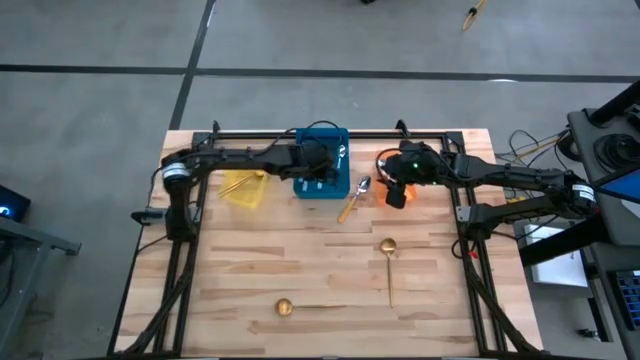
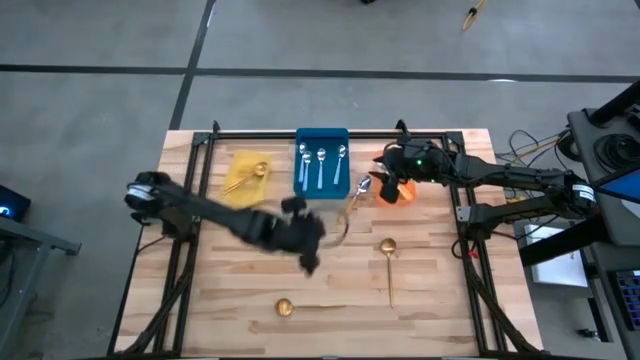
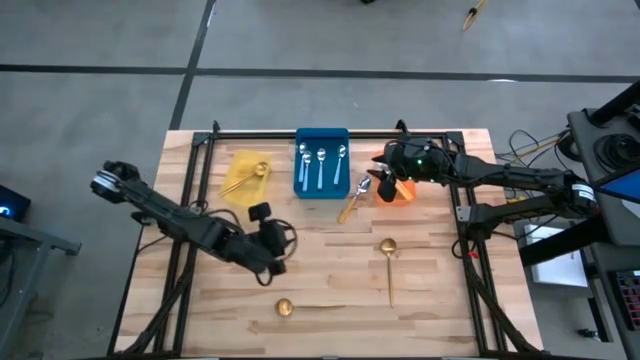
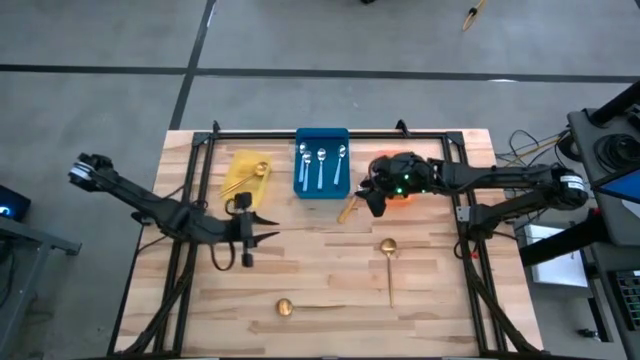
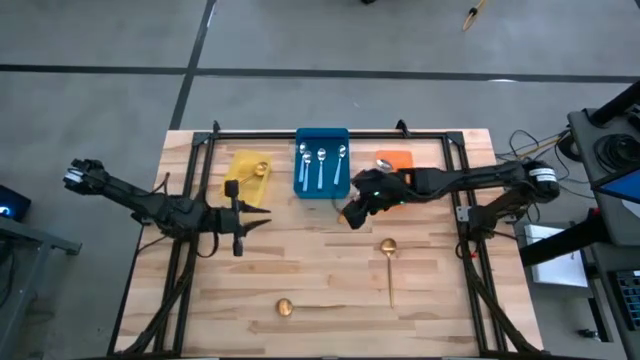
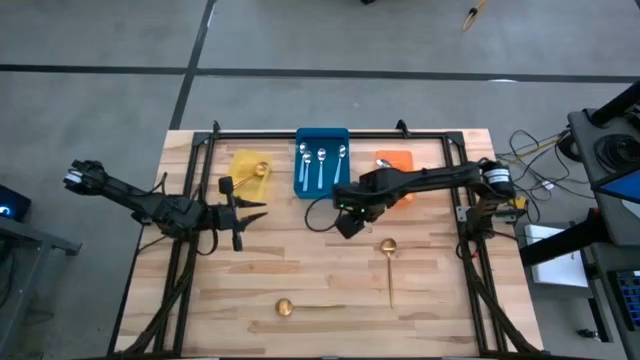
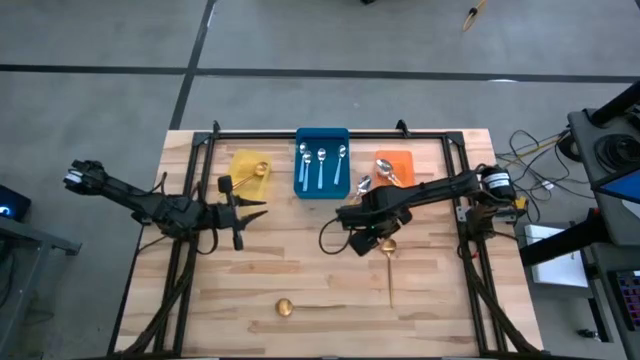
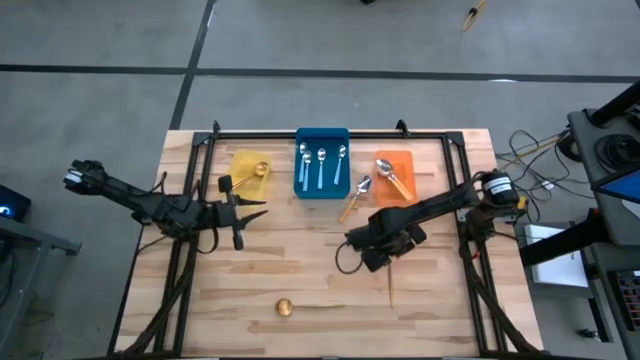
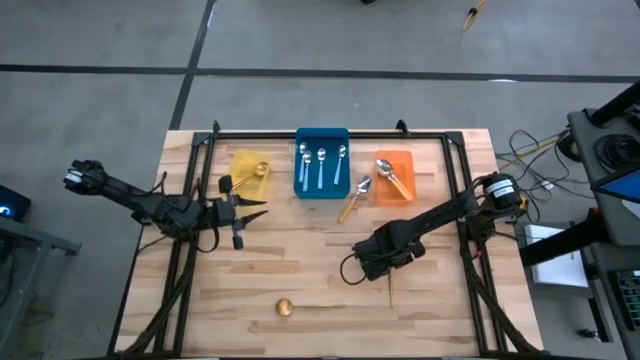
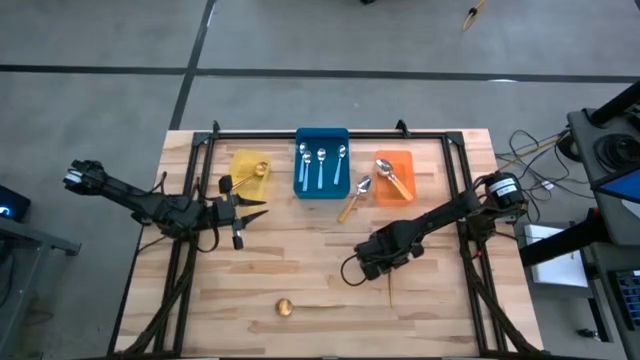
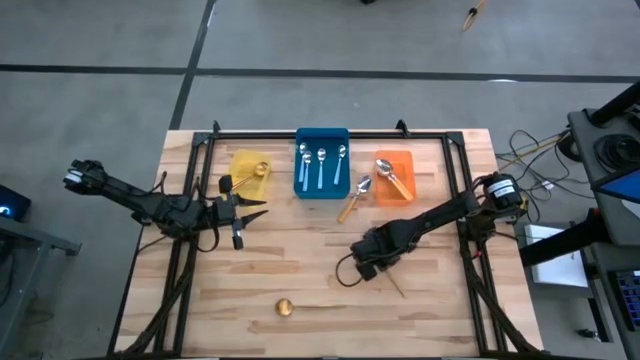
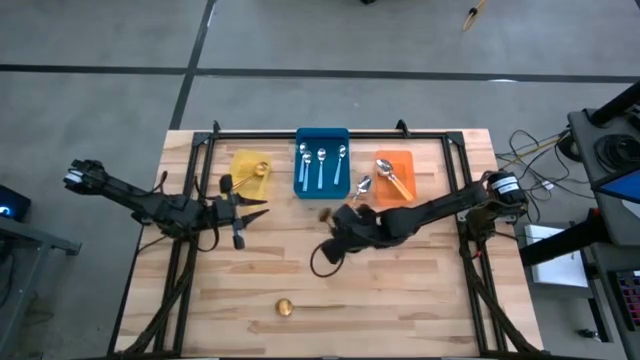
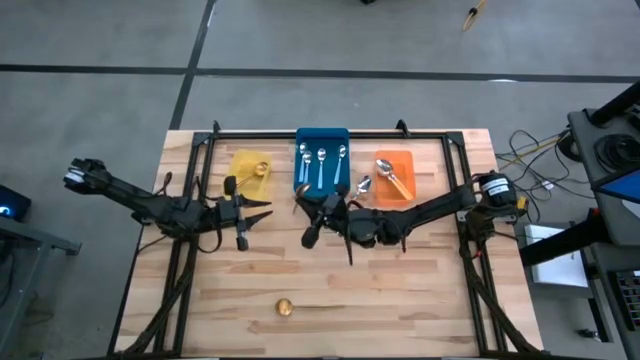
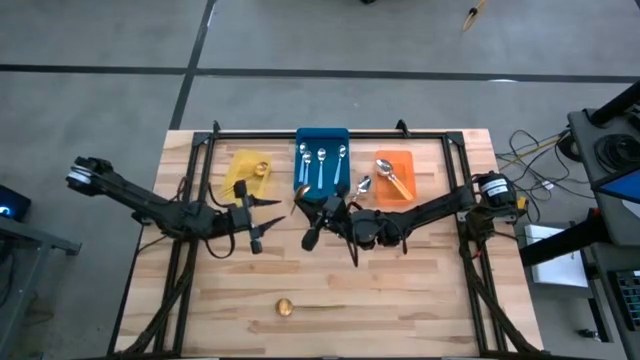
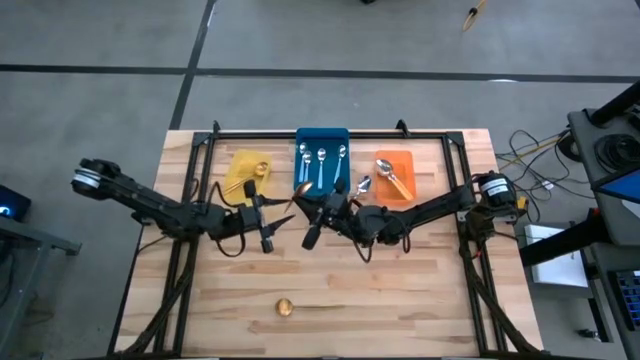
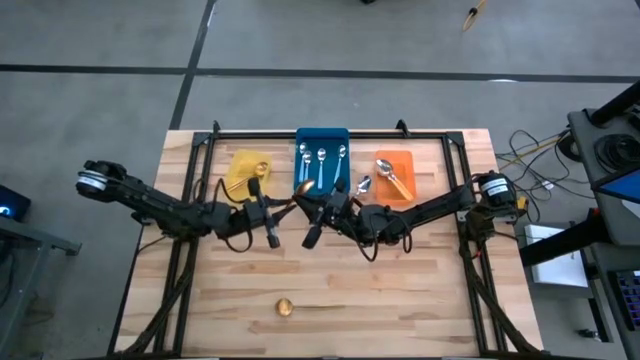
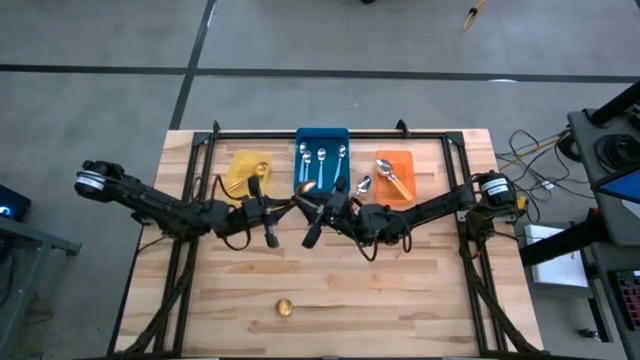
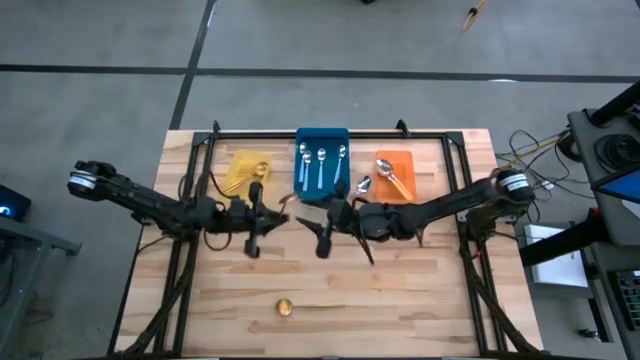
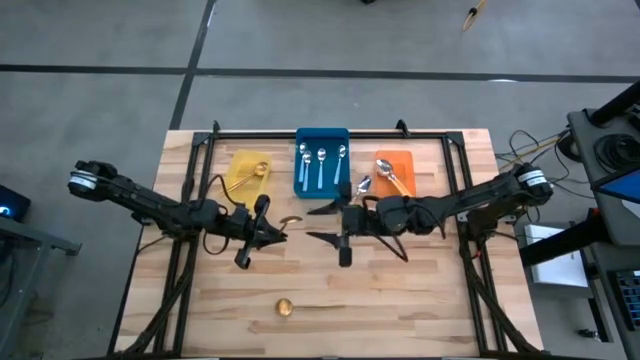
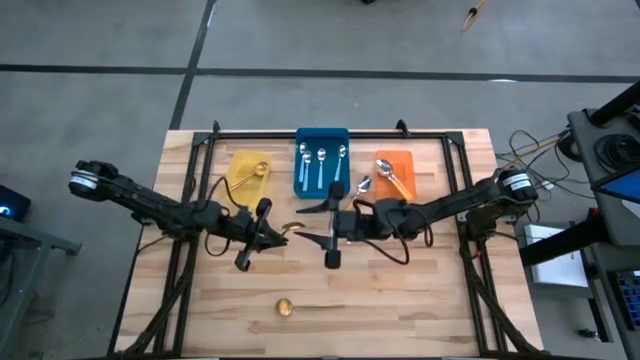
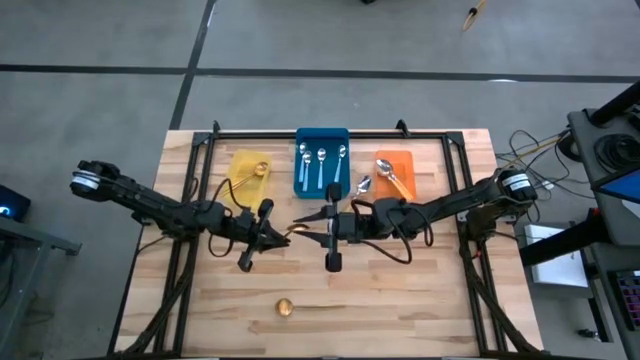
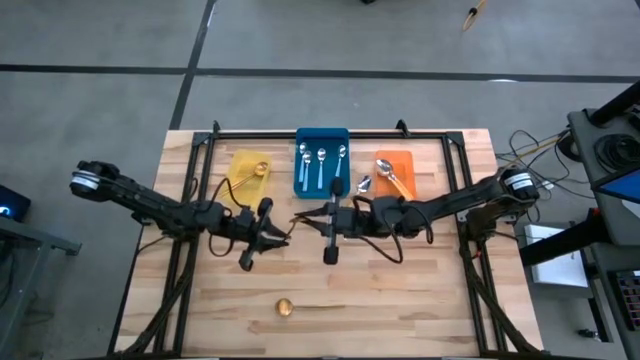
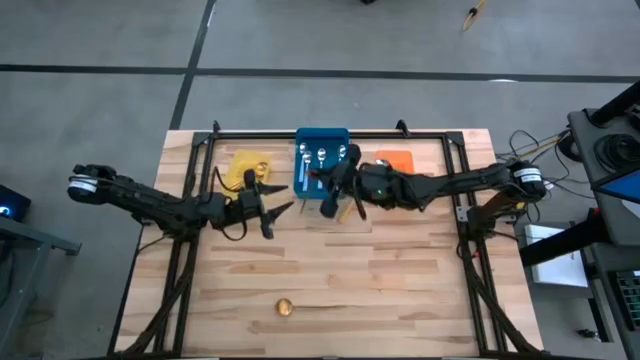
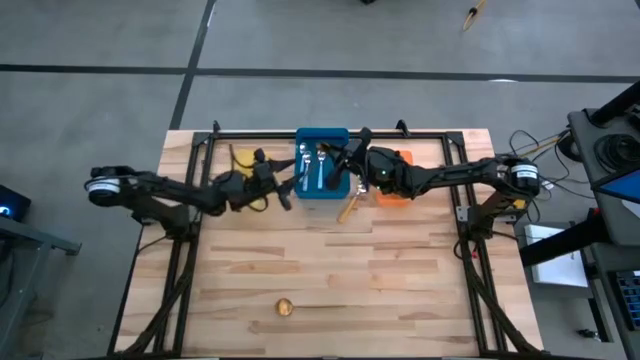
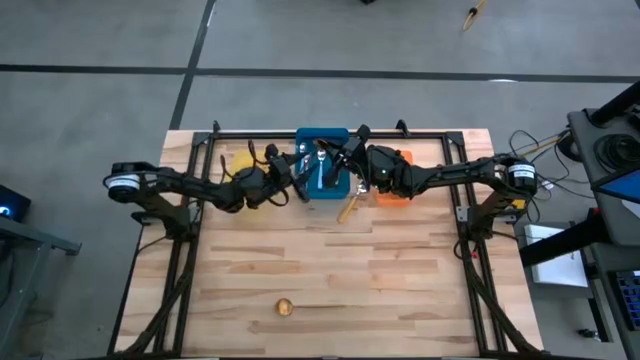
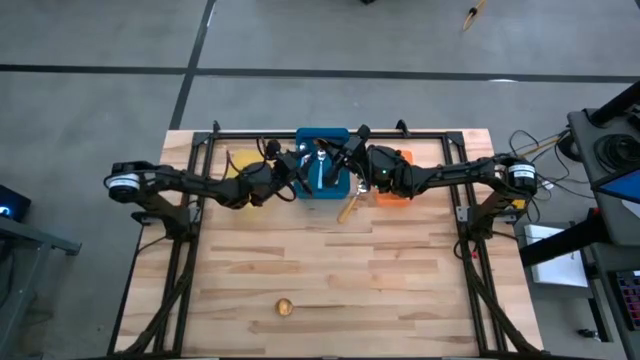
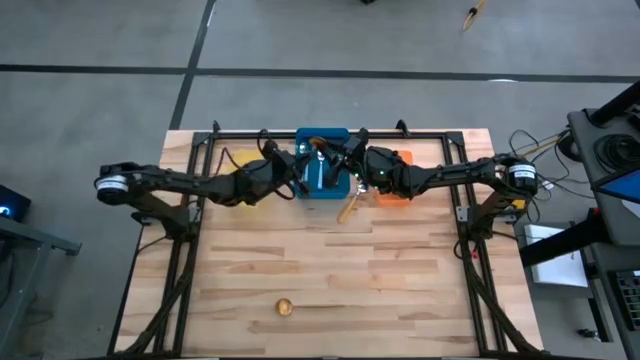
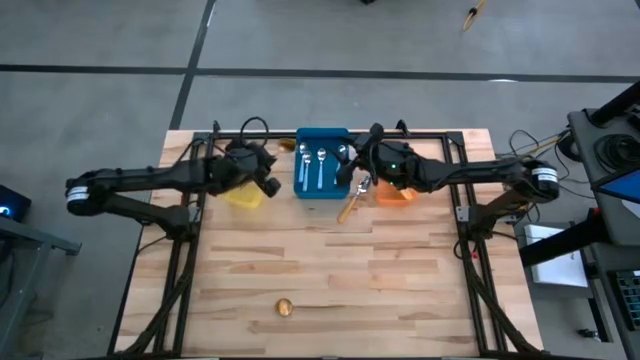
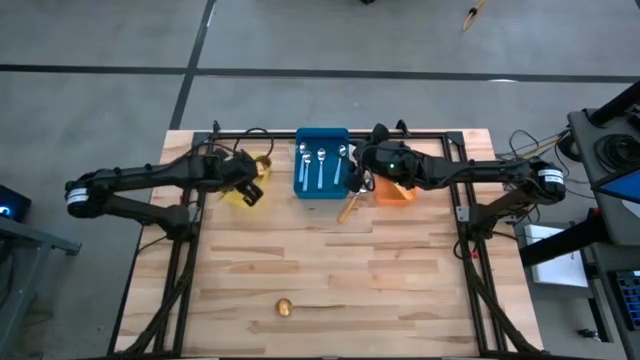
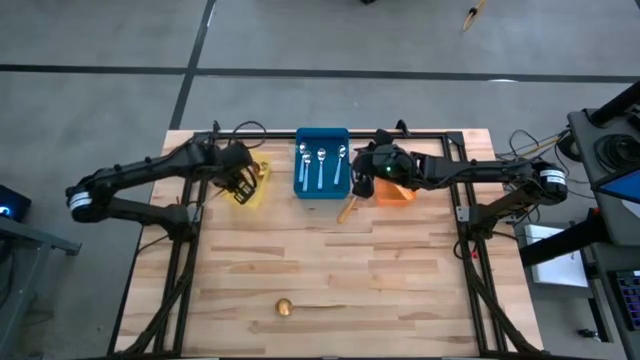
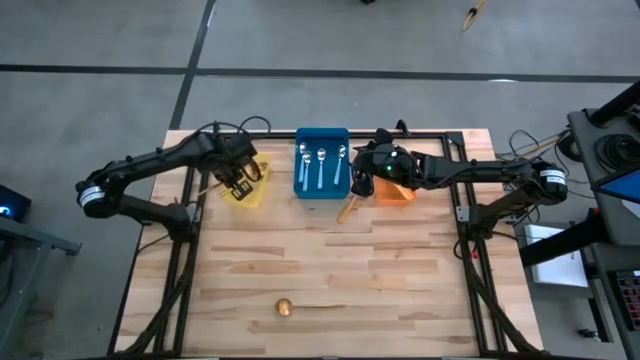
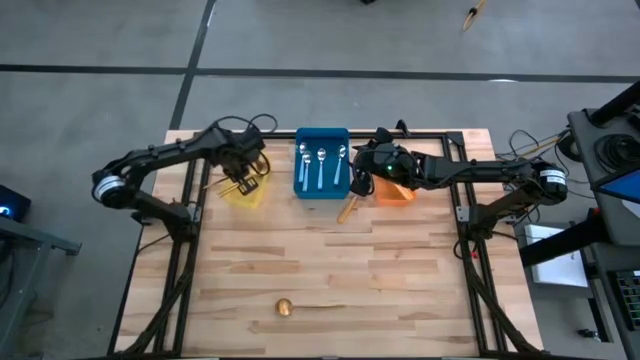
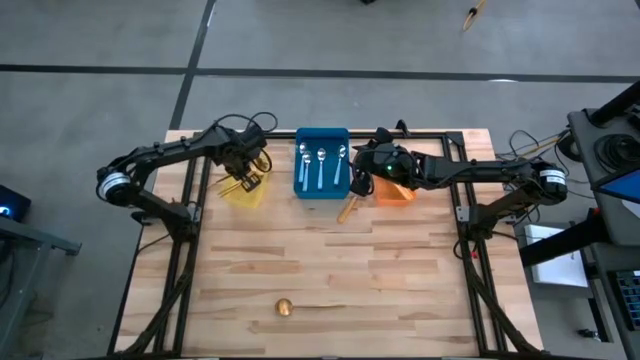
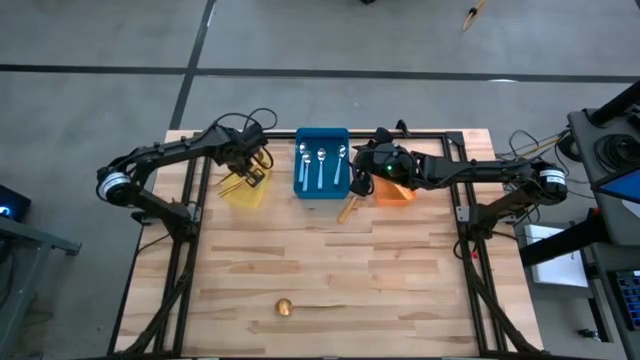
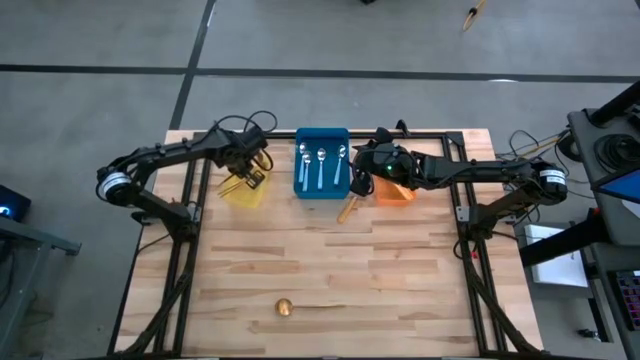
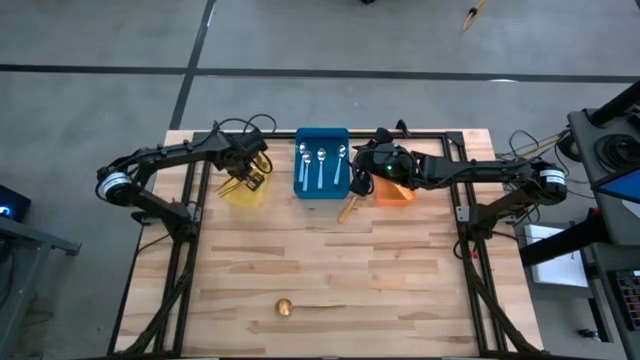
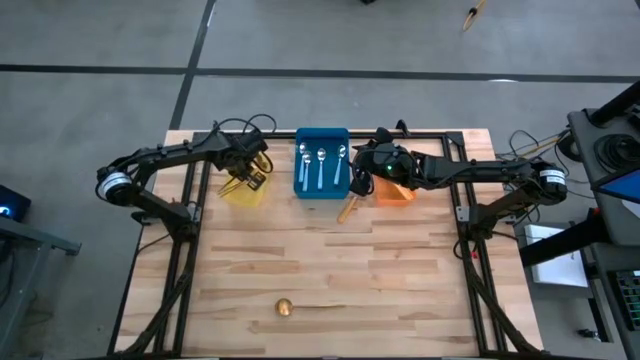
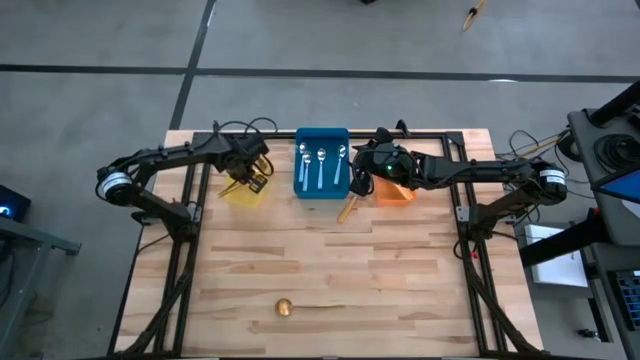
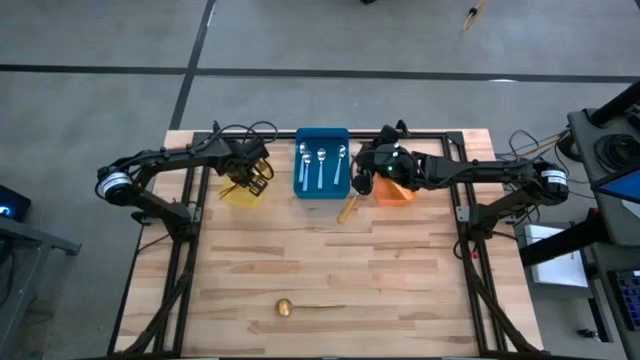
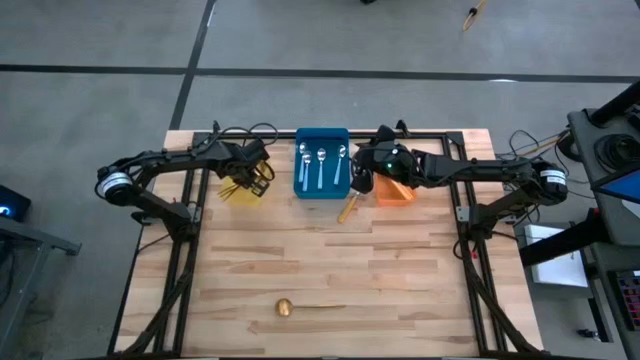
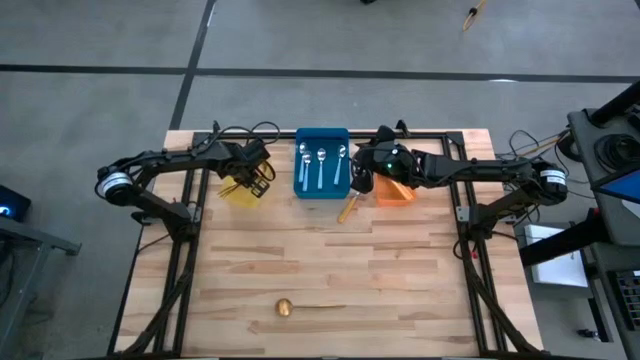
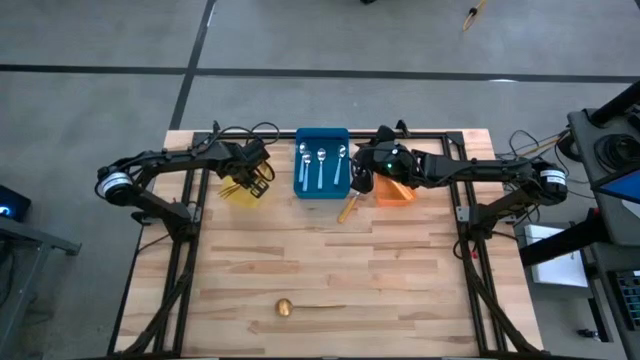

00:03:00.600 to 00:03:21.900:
Task: Sort silverware by color (type)
Put the gold spoon into the yellow bin
